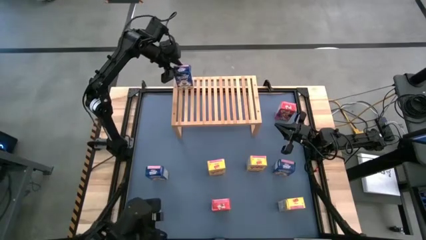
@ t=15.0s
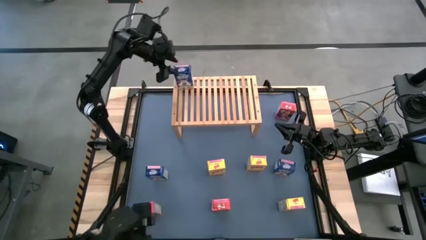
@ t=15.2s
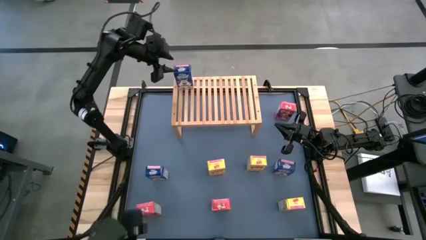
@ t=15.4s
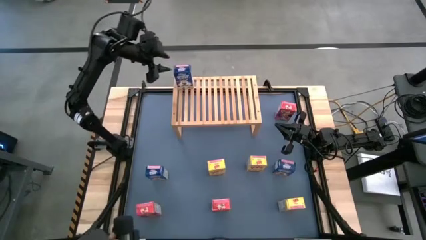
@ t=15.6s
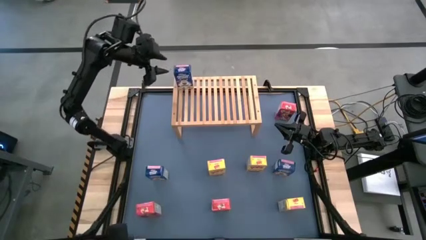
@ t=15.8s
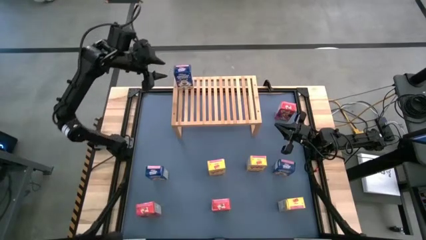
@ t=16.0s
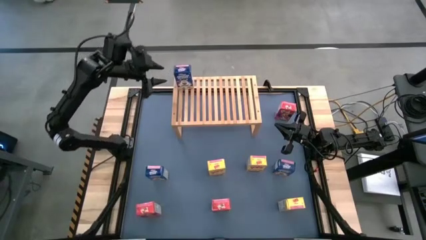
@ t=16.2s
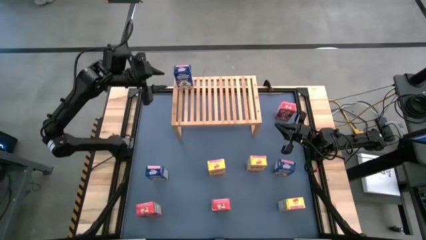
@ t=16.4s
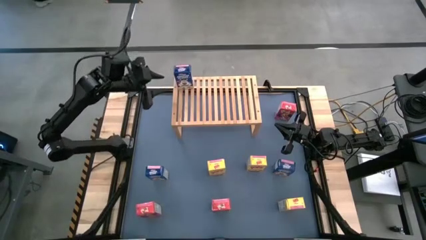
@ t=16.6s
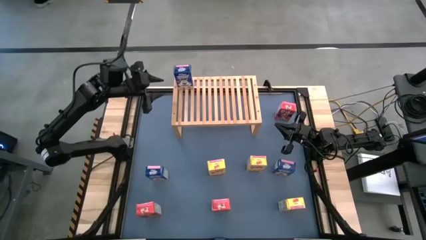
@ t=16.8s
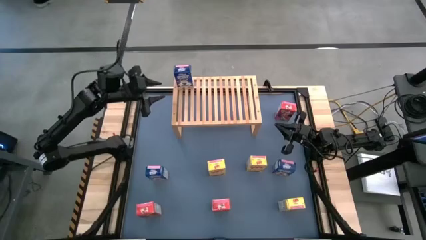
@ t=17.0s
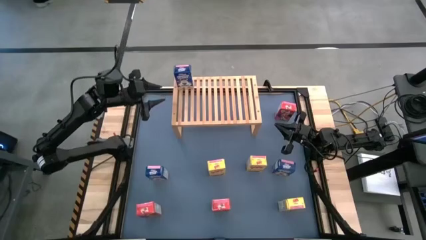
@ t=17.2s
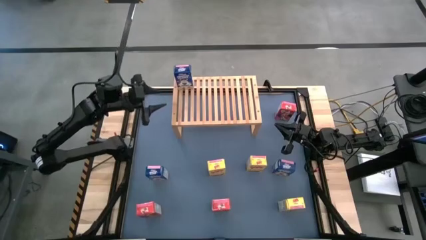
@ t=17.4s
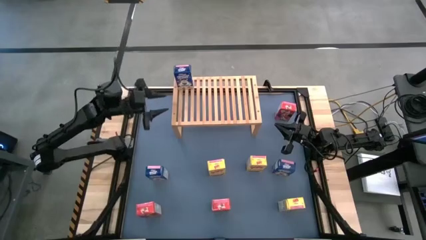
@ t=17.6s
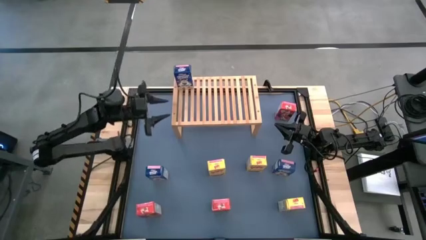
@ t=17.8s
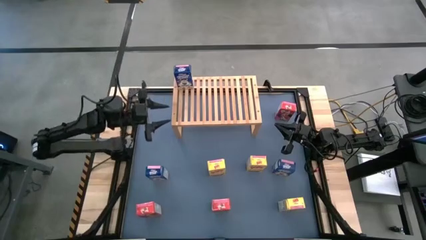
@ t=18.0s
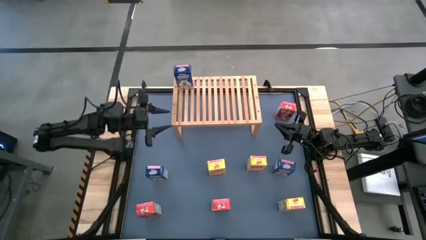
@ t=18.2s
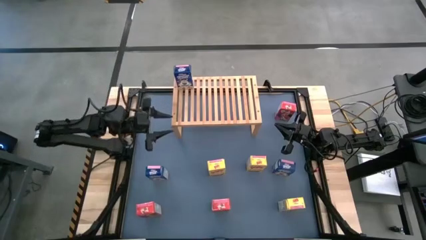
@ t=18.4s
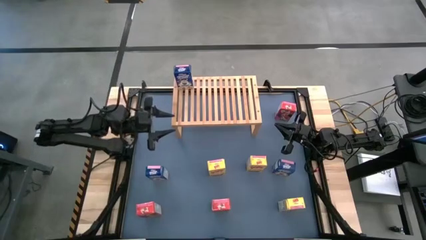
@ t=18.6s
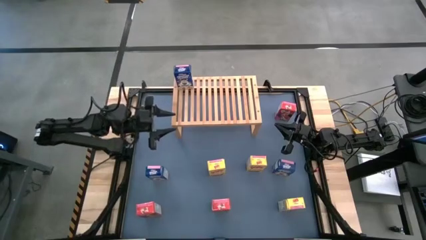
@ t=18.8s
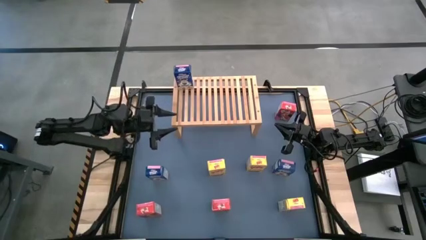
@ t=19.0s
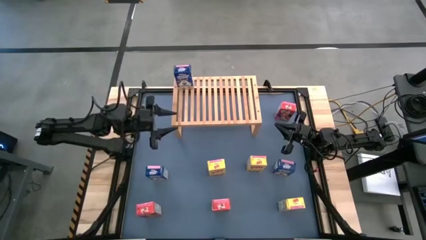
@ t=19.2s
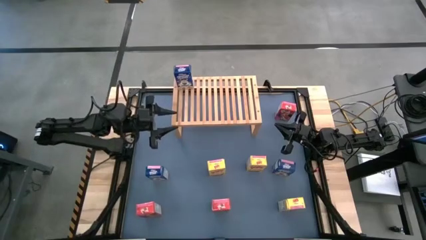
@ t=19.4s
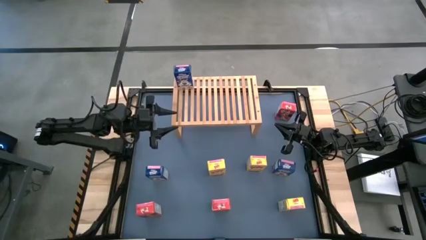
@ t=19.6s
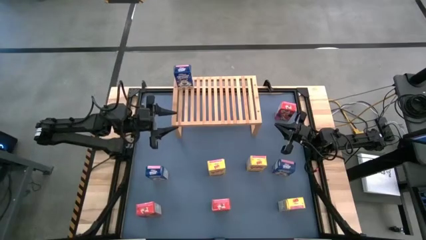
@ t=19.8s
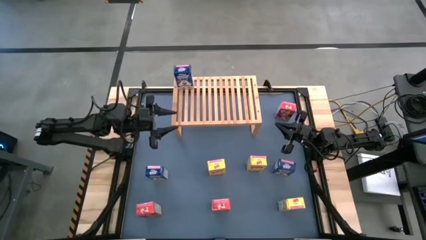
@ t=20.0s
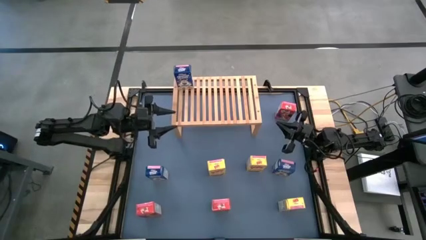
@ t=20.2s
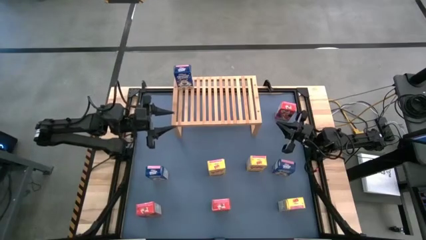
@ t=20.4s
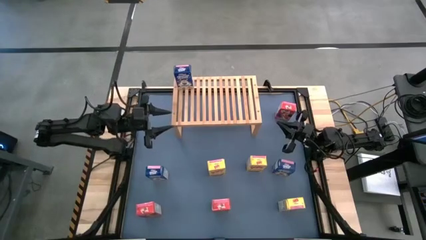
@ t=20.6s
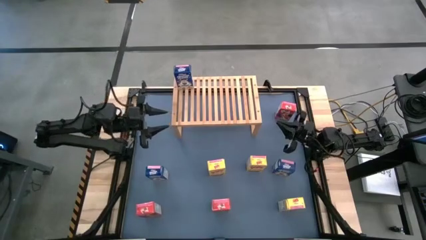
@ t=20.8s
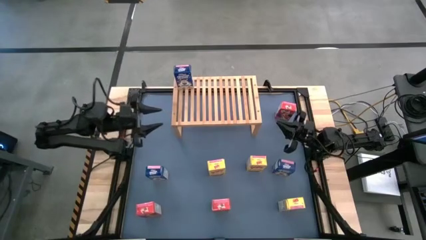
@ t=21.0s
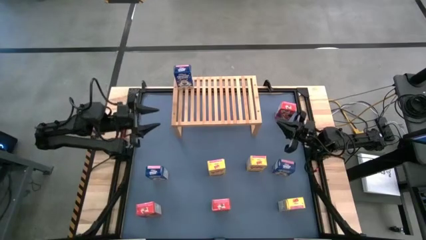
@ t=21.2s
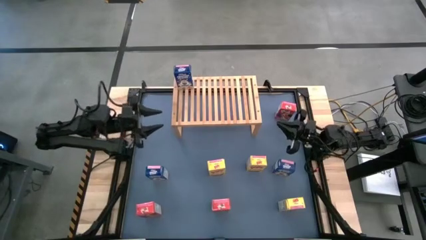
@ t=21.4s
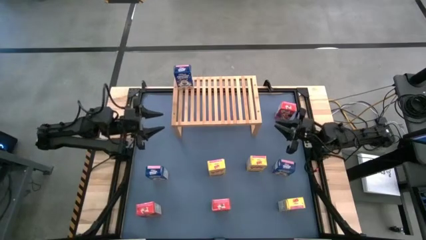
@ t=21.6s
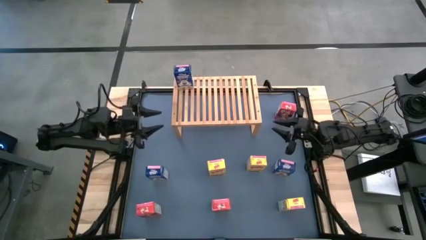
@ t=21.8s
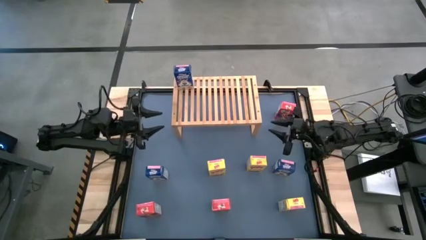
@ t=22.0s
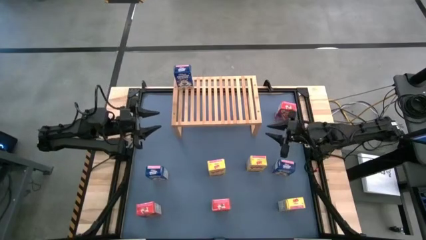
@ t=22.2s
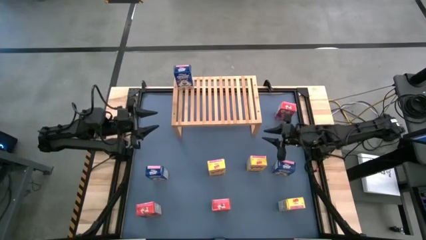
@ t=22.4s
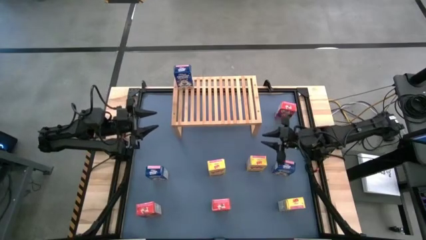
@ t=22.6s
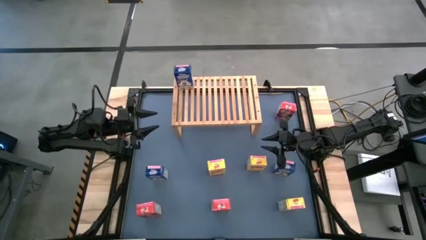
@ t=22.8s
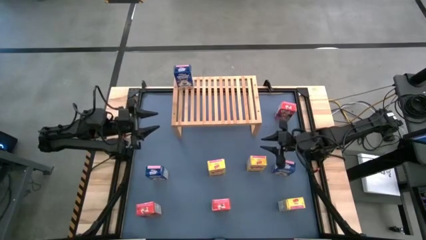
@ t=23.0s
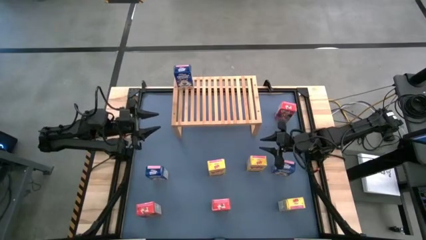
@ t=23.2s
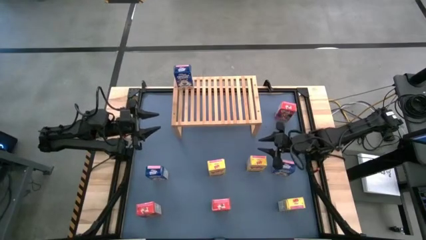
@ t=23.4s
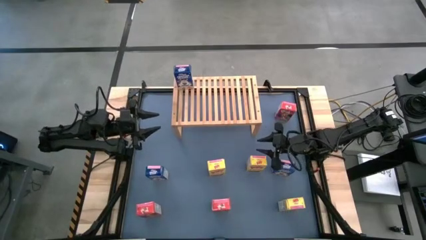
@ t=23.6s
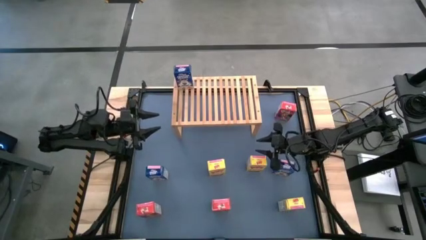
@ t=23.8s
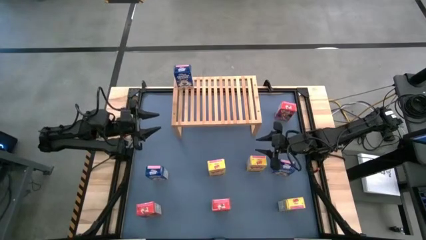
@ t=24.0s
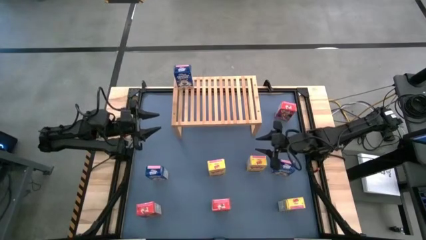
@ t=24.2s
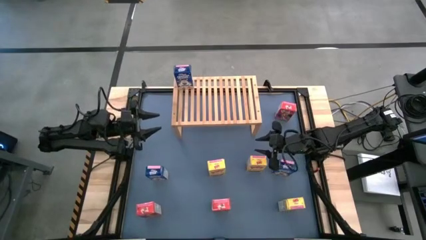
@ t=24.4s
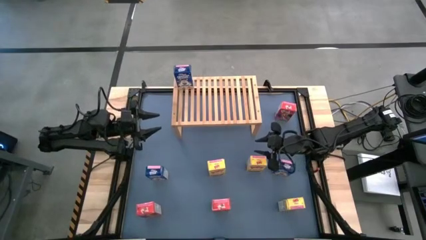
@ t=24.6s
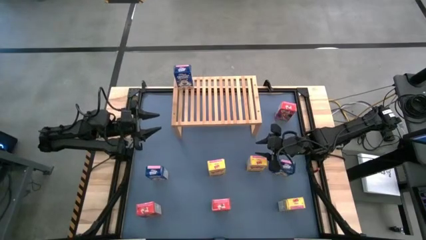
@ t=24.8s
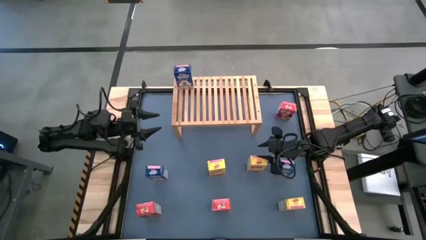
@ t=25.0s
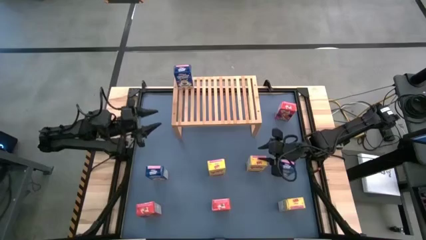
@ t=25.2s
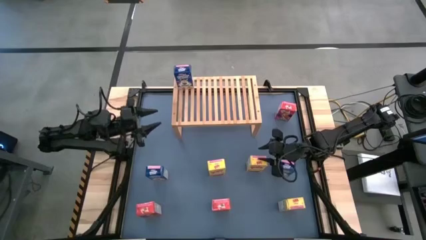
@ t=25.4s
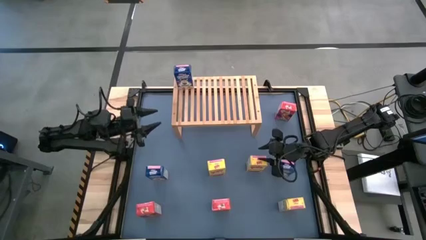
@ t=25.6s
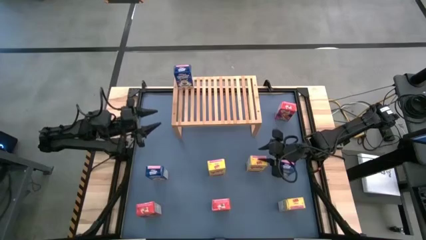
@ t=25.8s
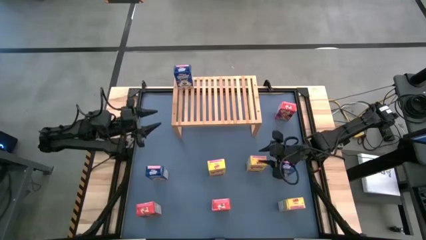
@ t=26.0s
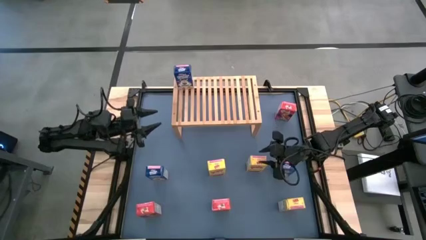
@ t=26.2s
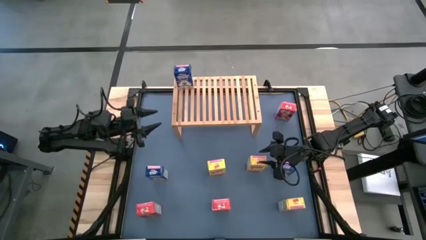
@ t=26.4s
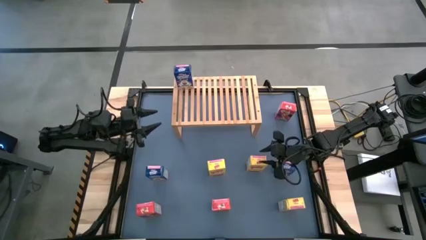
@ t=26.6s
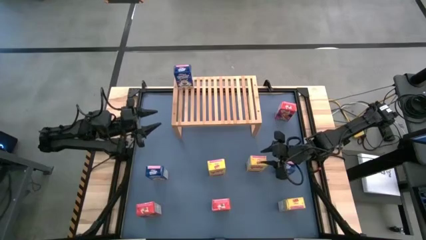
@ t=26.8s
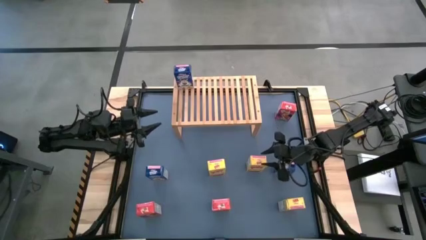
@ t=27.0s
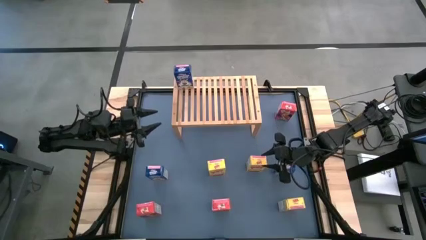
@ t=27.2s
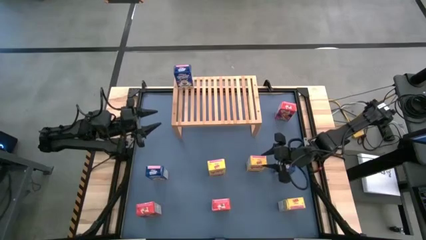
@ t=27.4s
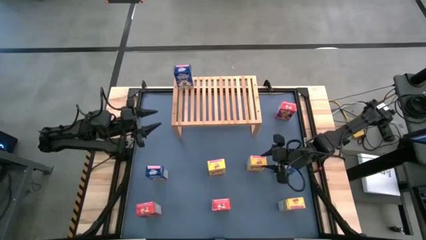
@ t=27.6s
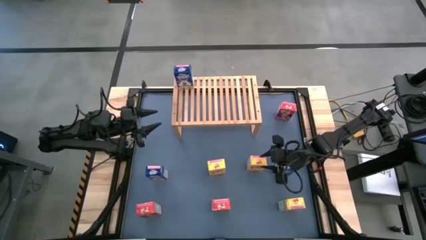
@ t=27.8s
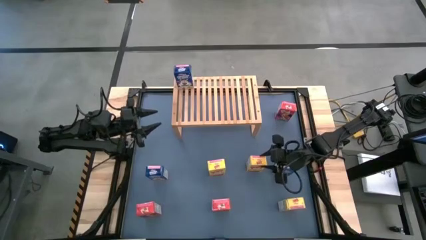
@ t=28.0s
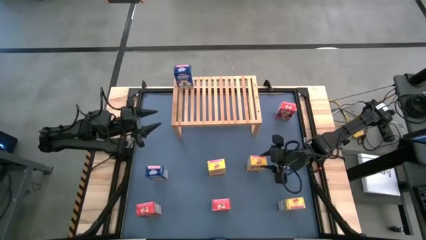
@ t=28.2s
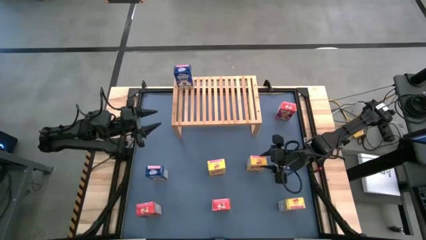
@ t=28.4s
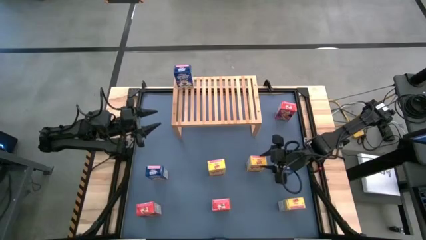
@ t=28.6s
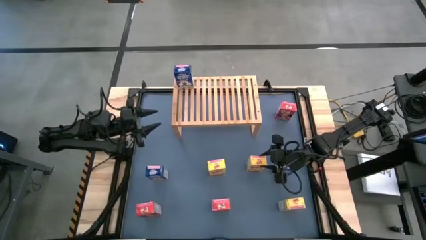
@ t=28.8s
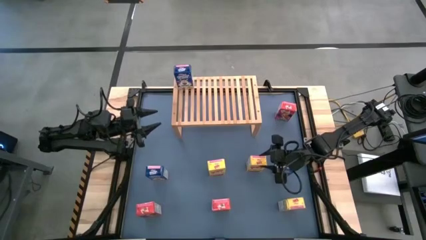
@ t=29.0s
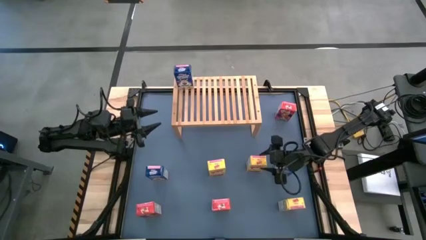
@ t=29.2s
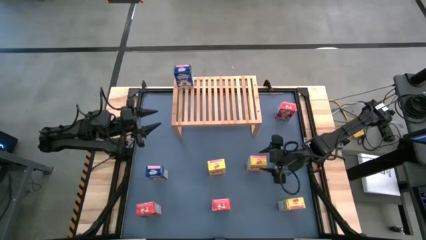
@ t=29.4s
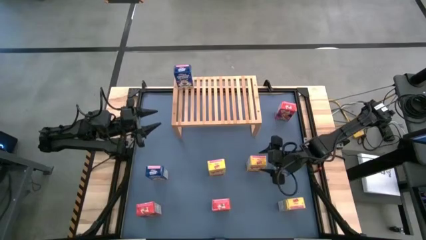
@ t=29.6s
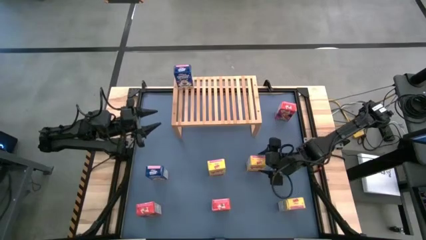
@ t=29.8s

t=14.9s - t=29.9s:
Task: Stack cereal on shelf
Put the top right yellow cereal box on the shelf
